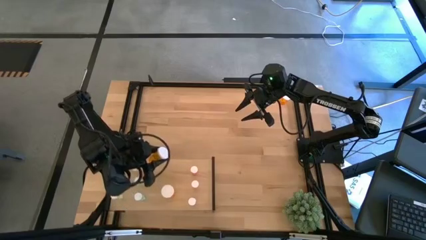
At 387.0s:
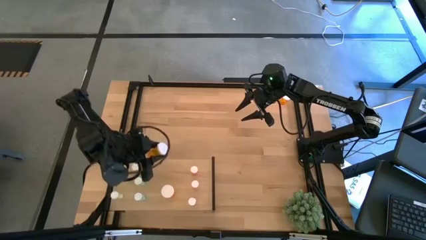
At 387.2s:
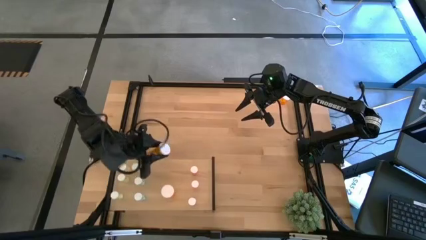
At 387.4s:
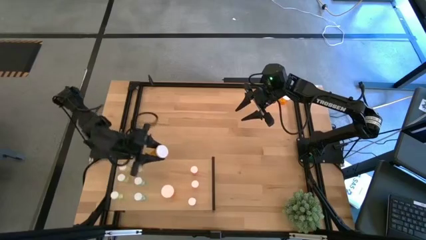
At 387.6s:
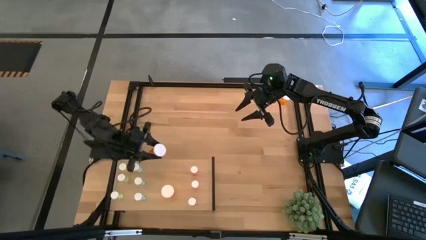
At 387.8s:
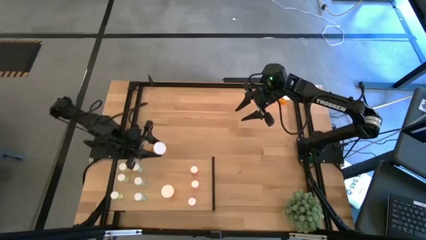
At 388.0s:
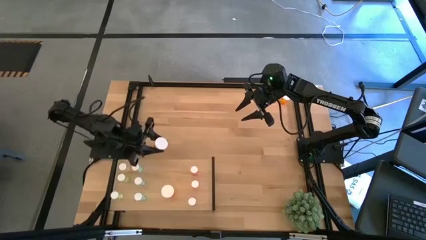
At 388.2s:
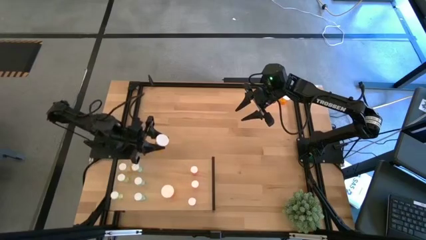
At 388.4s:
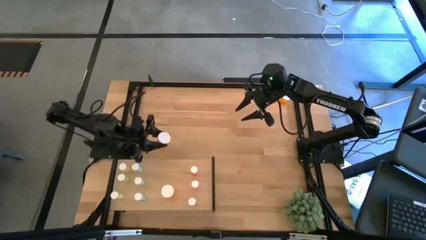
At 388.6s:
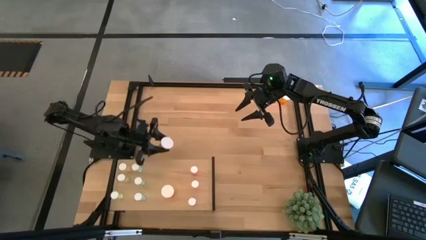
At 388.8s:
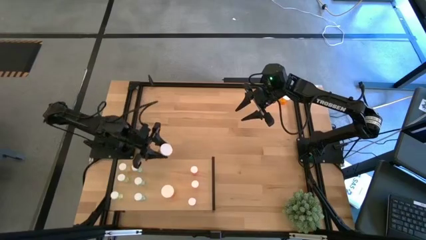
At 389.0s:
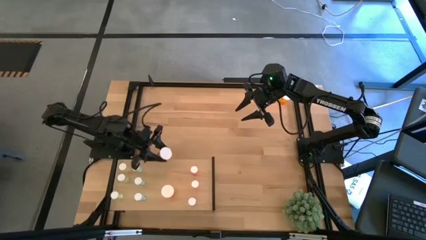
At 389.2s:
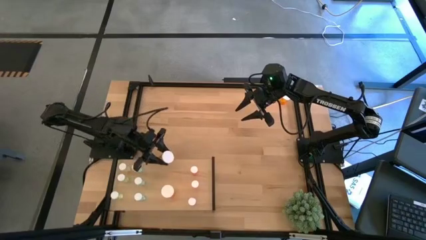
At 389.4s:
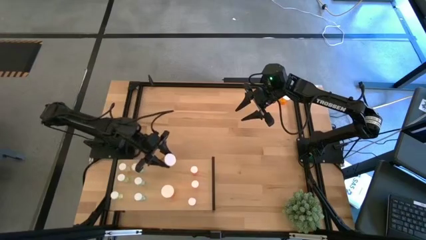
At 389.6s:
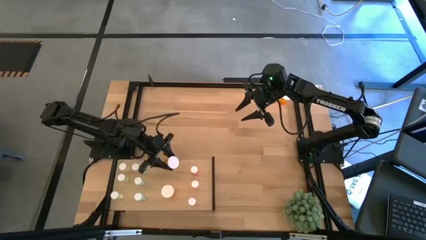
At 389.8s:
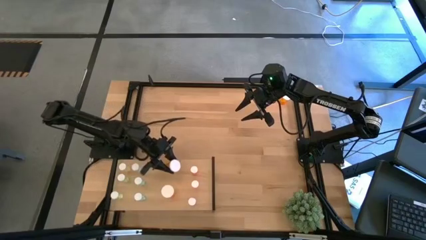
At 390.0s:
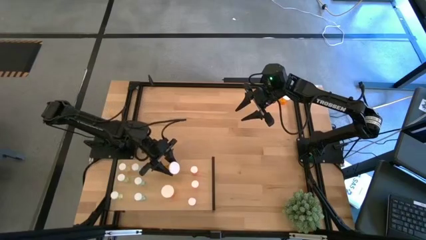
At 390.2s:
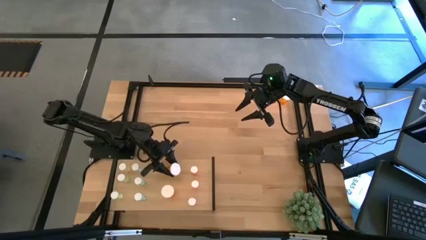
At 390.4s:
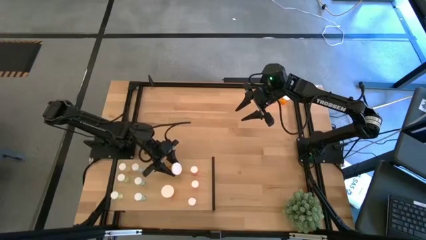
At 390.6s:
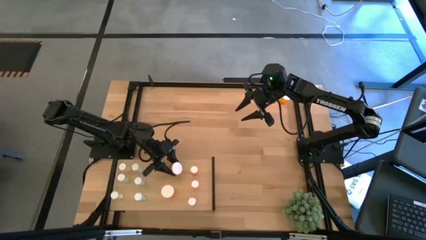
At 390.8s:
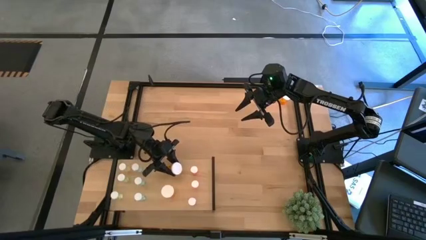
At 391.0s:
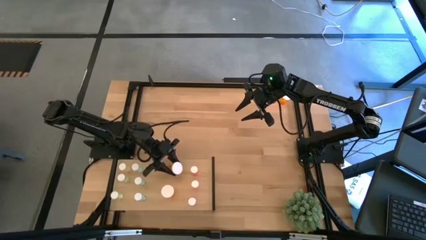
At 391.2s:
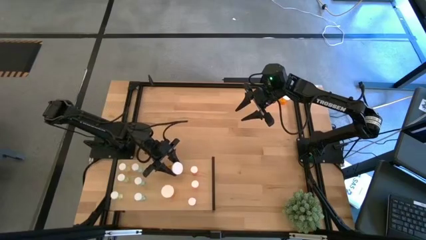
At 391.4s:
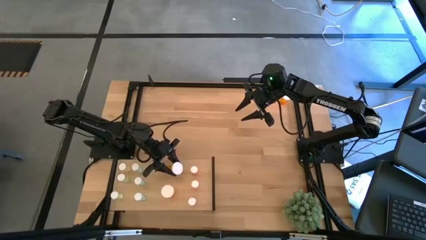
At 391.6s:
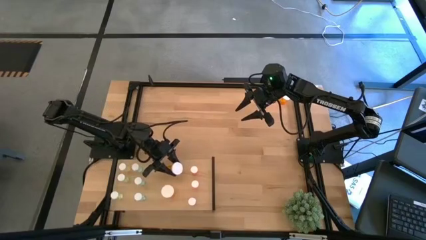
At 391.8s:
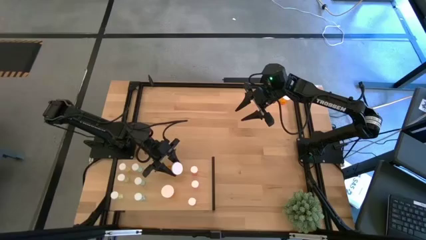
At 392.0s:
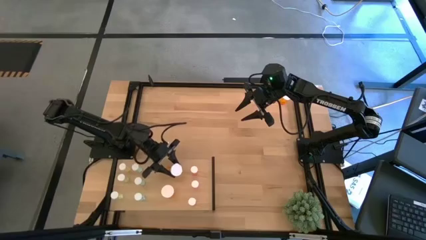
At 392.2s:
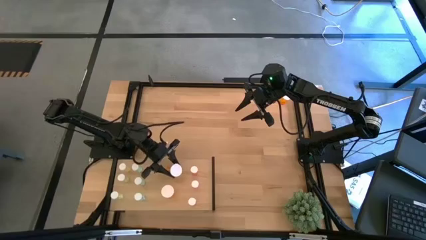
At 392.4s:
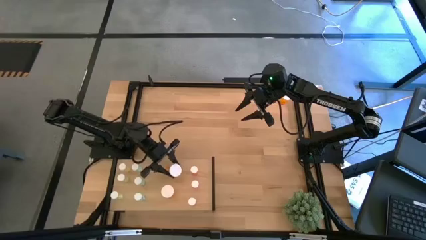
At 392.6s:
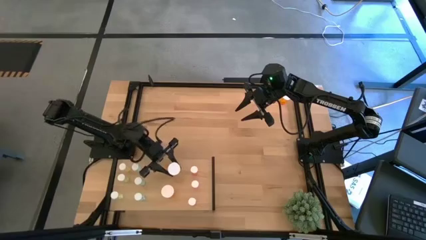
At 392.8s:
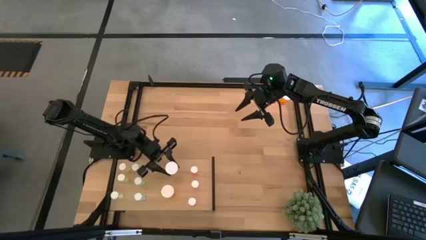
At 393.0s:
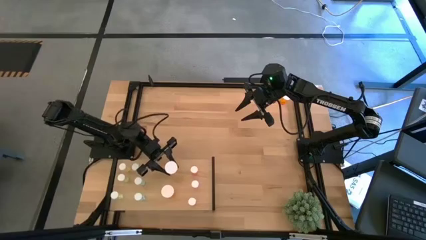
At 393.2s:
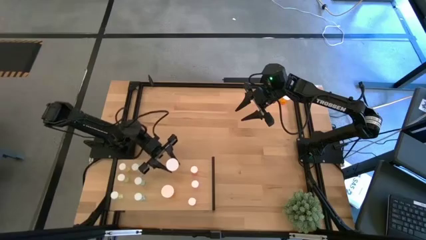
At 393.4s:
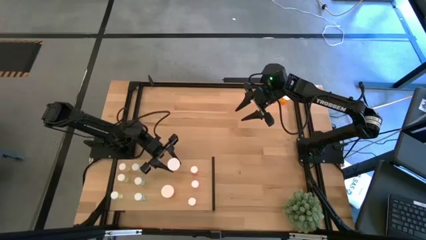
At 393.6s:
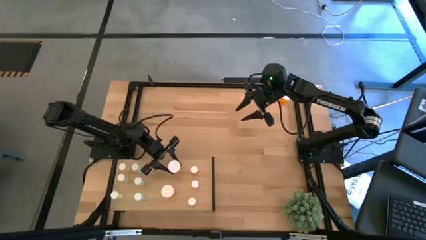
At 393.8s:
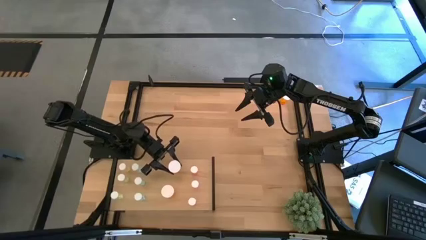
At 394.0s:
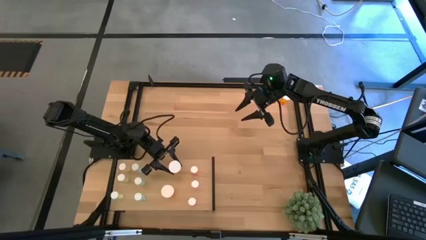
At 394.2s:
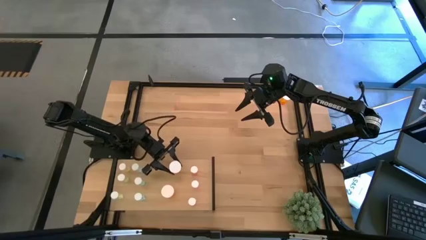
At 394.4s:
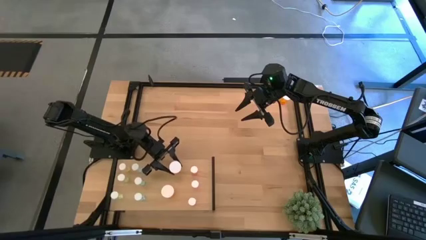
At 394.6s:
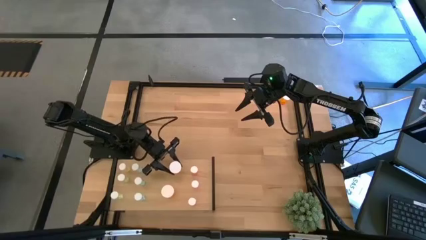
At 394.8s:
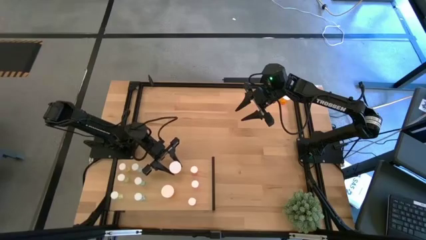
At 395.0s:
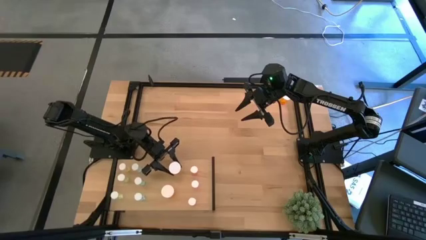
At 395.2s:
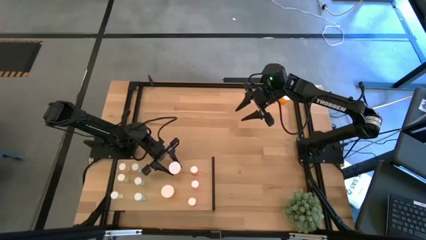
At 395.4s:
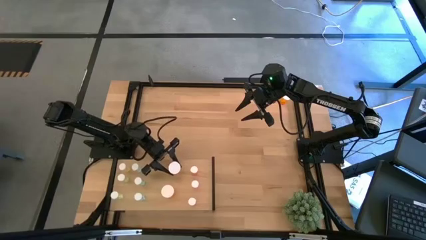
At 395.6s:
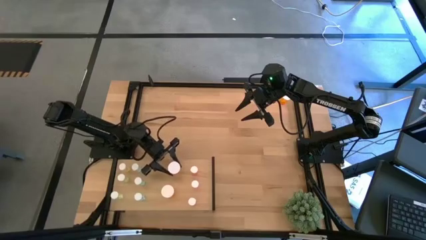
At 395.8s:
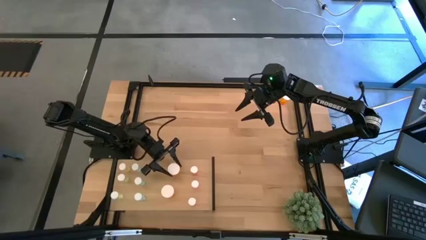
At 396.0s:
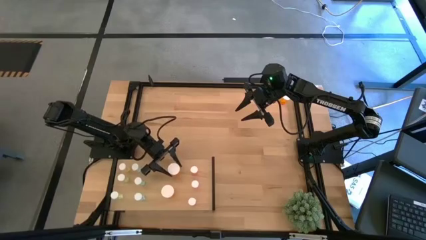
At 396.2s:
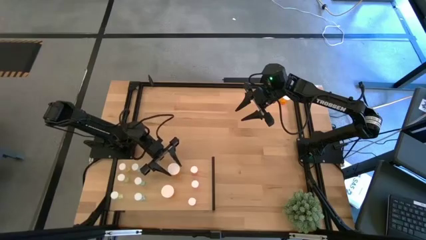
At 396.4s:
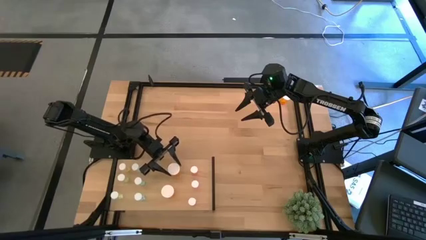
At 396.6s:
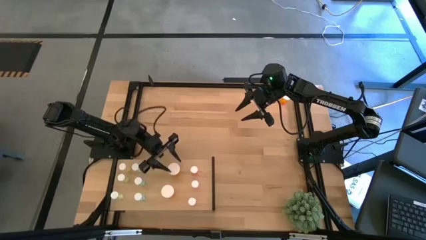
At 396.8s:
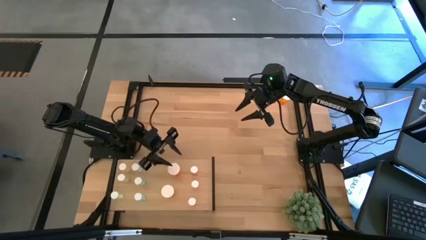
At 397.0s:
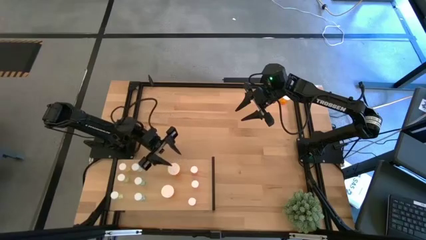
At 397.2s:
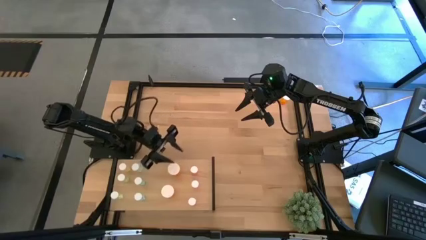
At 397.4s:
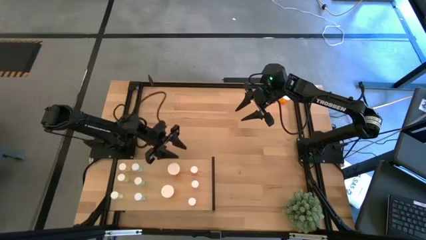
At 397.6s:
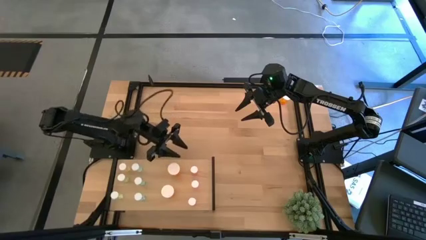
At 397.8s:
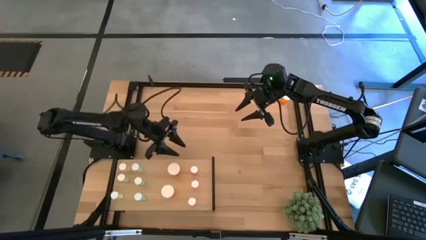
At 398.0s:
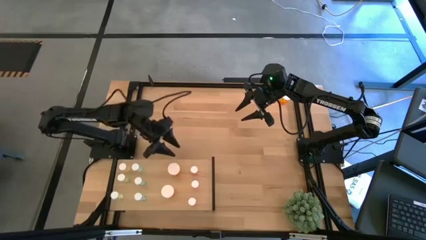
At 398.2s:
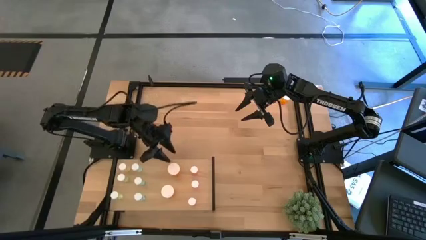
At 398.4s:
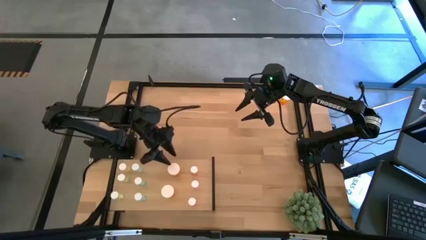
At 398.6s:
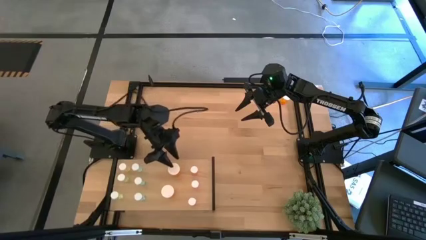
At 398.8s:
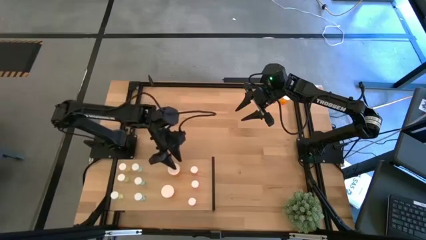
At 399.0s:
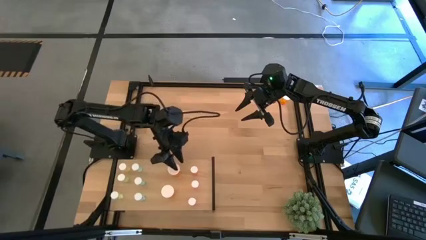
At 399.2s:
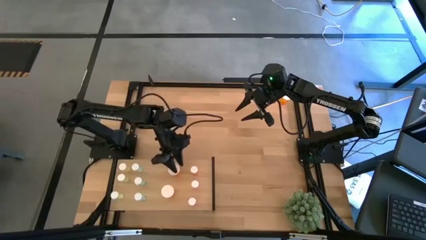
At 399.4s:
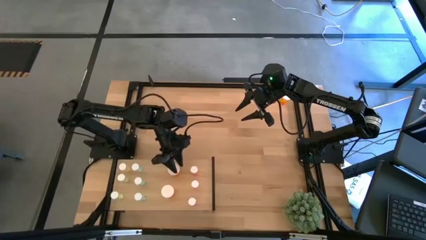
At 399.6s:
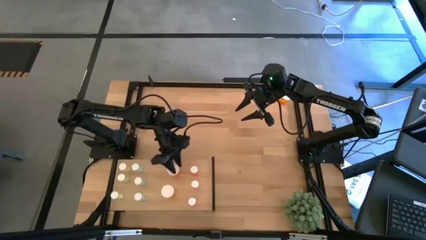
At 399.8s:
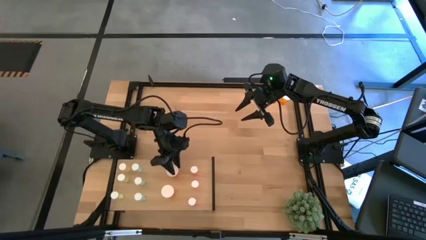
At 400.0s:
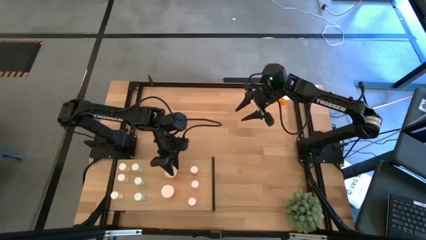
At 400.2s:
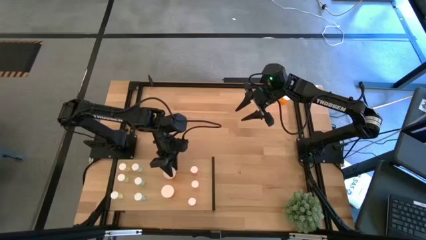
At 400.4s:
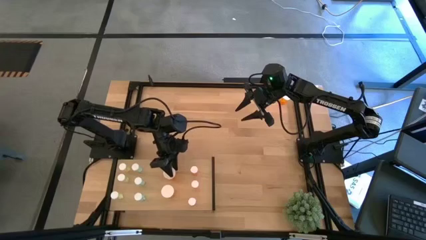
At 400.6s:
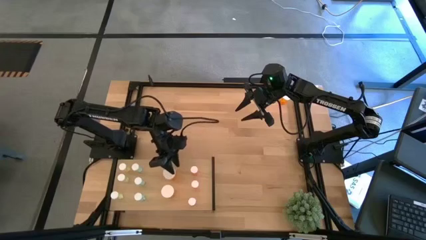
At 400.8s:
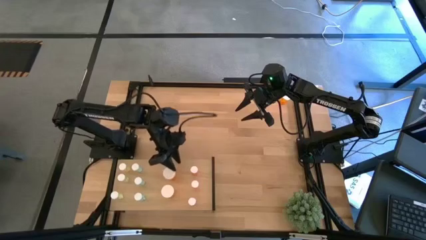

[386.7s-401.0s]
Task: Pick and place medicine bottles onto shelf by color
Put the top left orange pill bottle on the shelf aligned with the other orange pill bottle

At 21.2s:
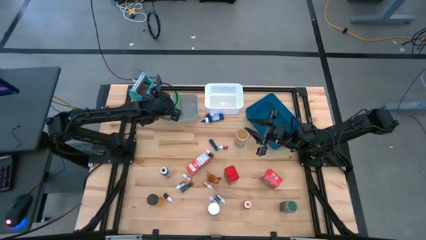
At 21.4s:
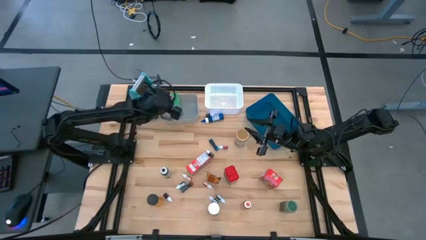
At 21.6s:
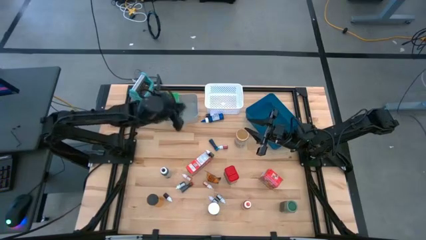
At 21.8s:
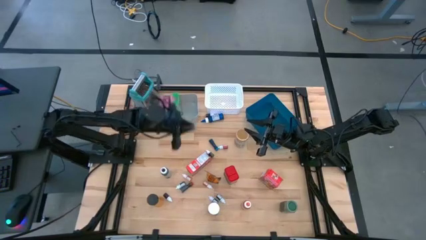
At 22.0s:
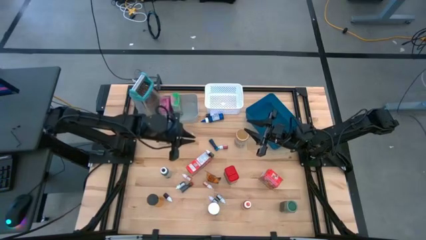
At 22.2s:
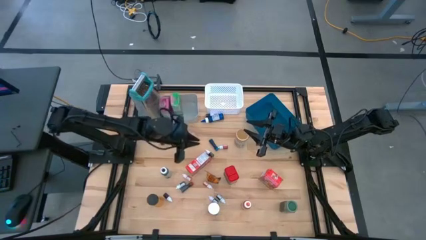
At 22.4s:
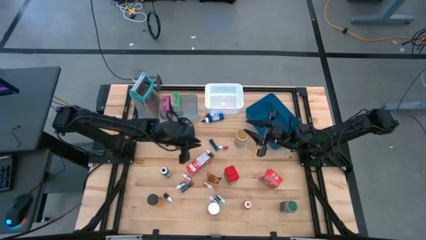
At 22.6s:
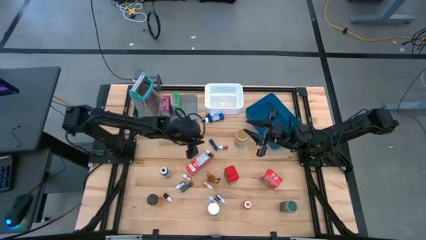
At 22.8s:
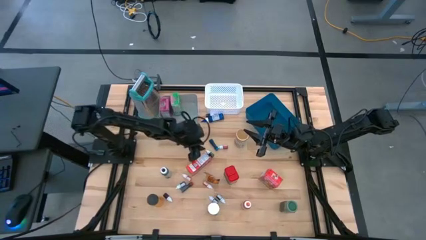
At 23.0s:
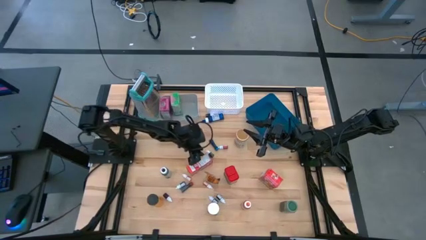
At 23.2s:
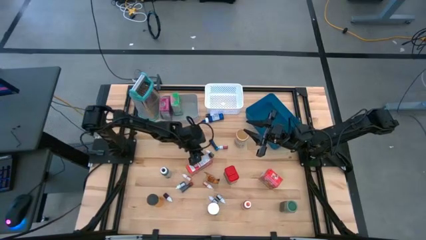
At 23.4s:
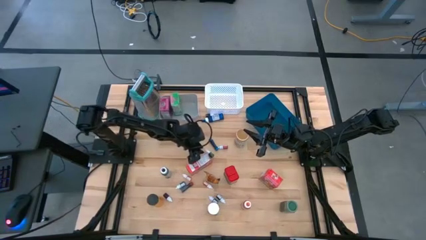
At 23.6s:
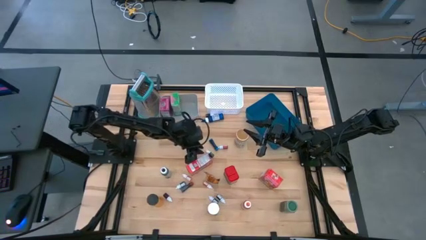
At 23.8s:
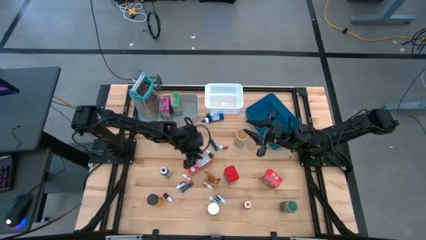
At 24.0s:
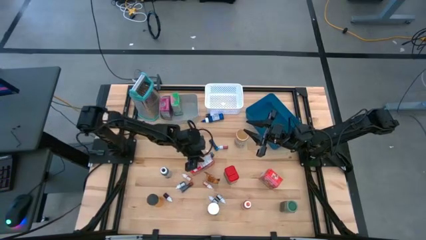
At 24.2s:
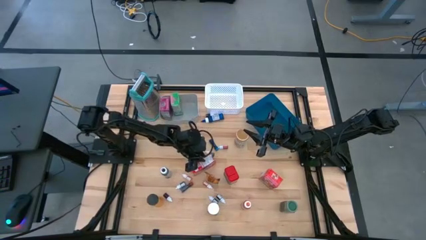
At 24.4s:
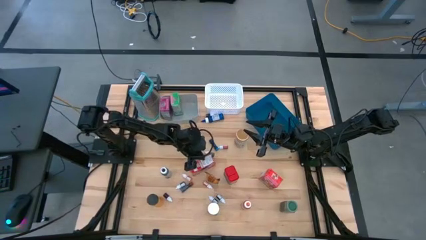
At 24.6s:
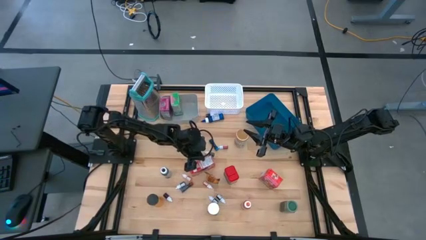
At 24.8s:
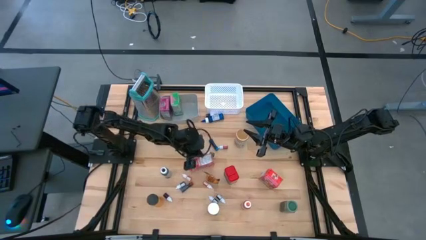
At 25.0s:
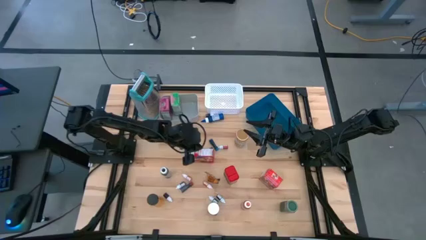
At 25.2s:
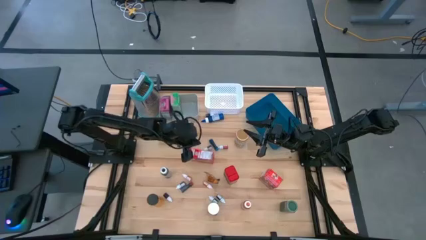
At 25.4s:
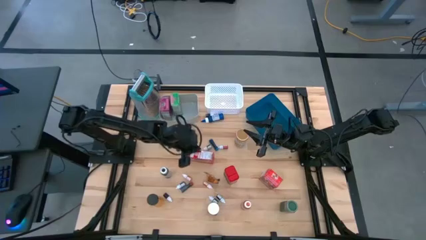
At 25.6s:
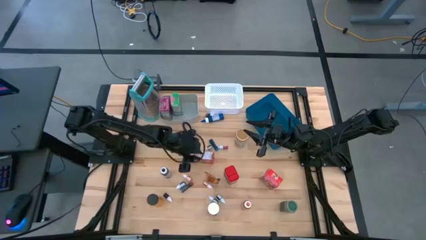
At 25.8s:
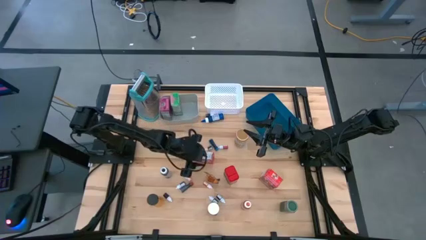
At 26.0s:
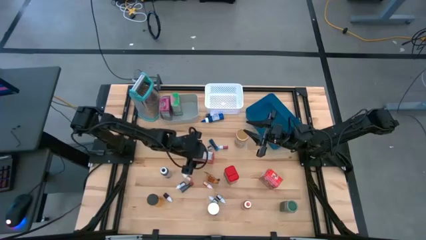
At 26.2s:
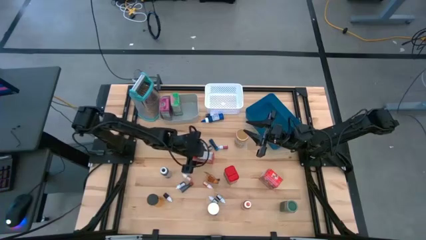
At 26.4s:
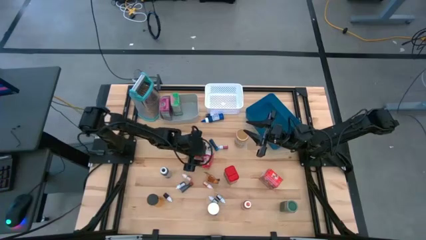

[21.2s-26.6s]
Task: Pick & Place Kitchen Items
Put the left red cereal box into the gray bin
